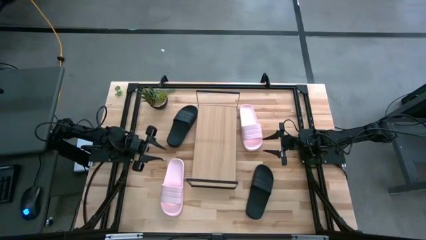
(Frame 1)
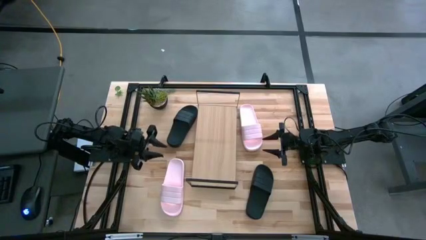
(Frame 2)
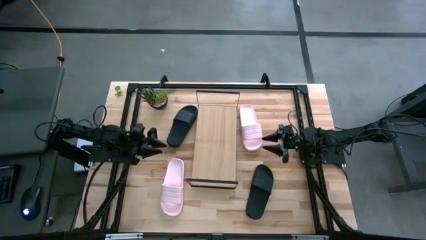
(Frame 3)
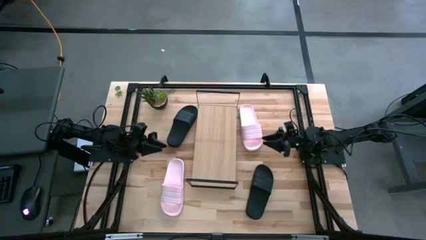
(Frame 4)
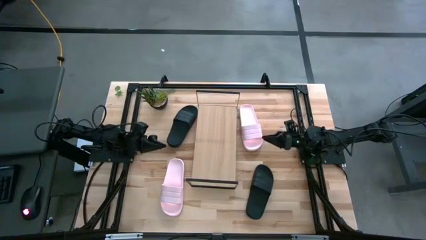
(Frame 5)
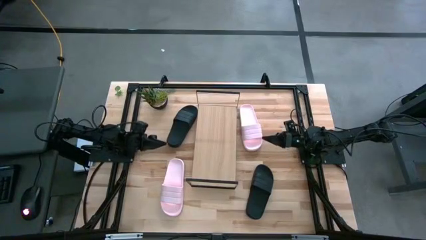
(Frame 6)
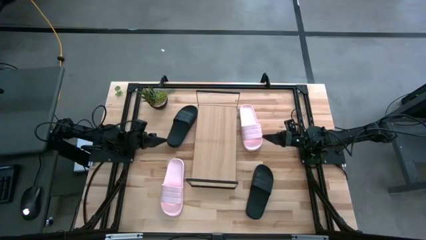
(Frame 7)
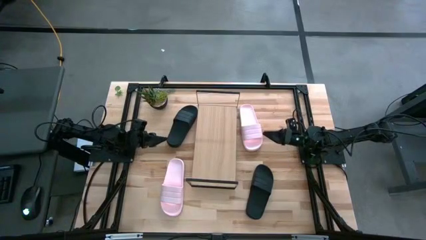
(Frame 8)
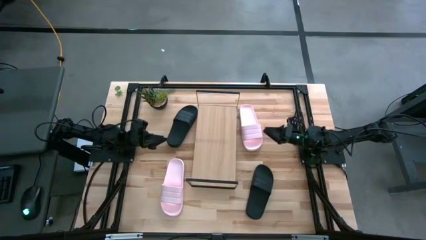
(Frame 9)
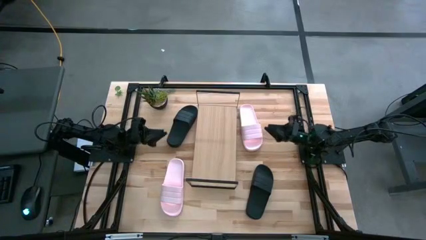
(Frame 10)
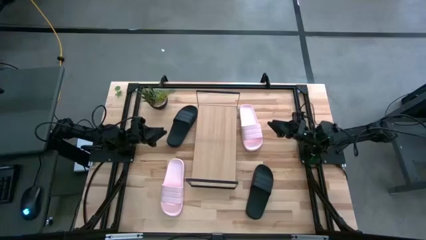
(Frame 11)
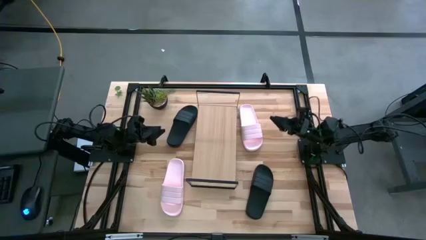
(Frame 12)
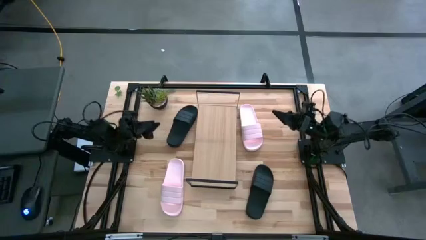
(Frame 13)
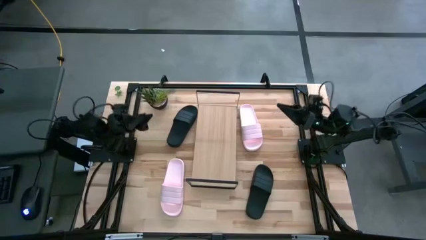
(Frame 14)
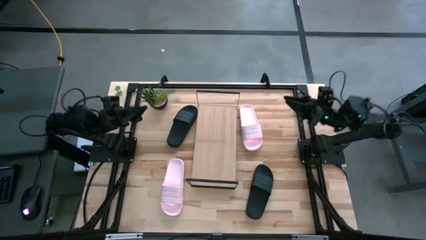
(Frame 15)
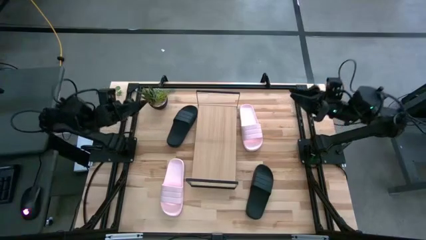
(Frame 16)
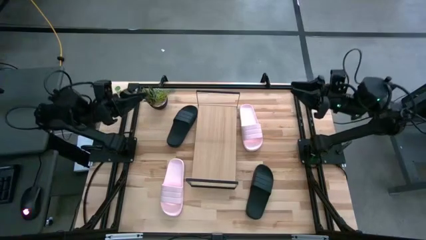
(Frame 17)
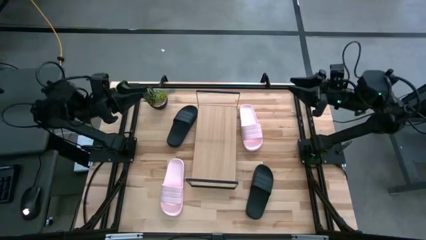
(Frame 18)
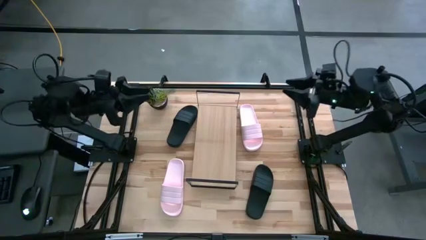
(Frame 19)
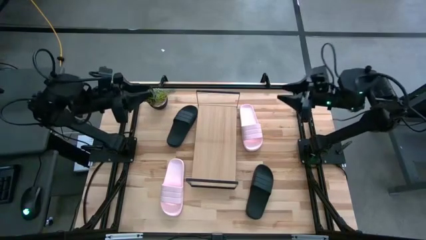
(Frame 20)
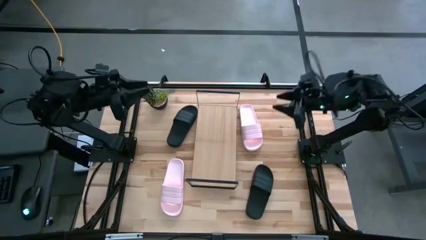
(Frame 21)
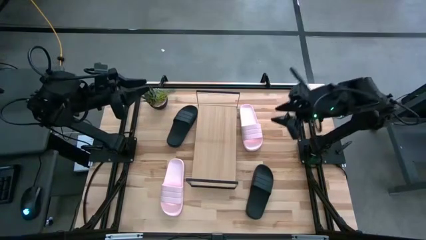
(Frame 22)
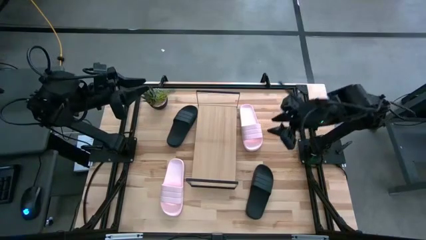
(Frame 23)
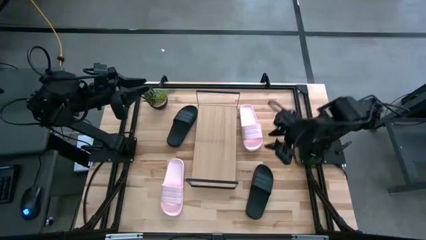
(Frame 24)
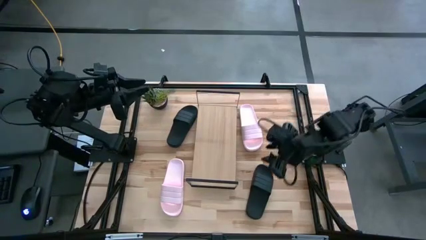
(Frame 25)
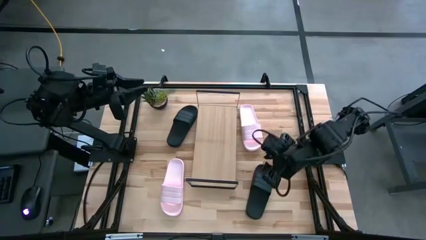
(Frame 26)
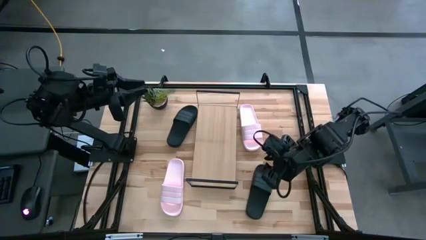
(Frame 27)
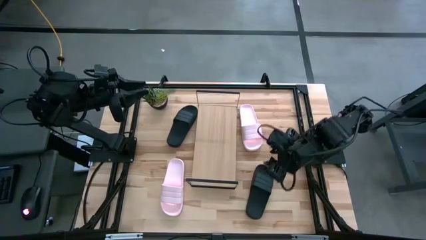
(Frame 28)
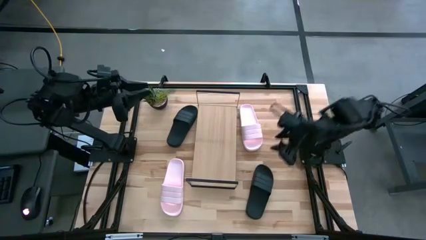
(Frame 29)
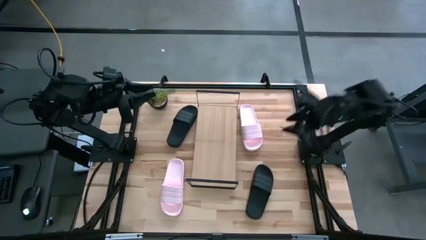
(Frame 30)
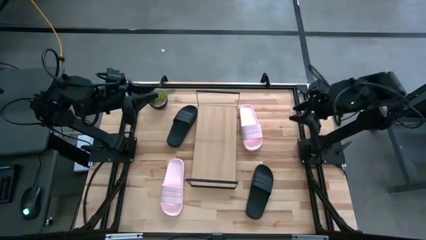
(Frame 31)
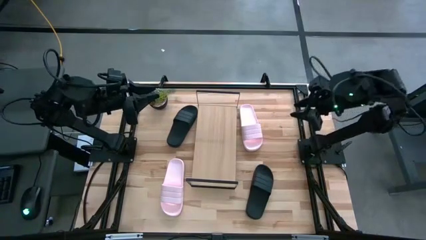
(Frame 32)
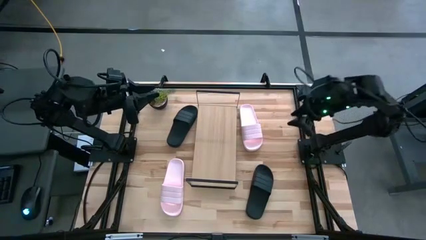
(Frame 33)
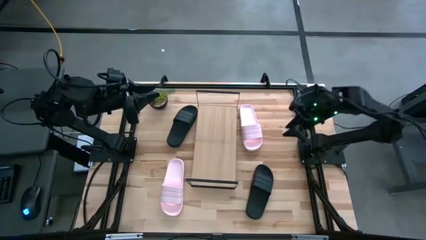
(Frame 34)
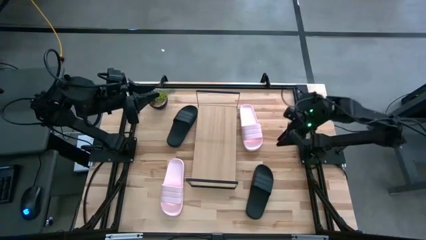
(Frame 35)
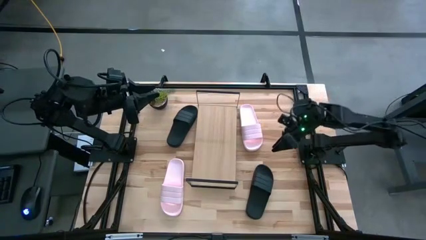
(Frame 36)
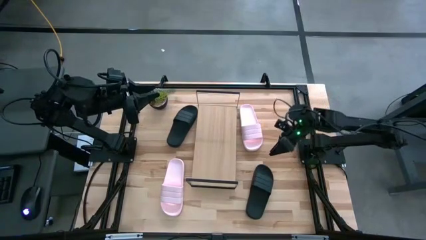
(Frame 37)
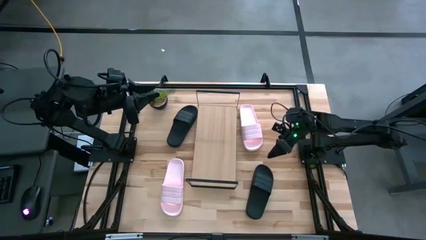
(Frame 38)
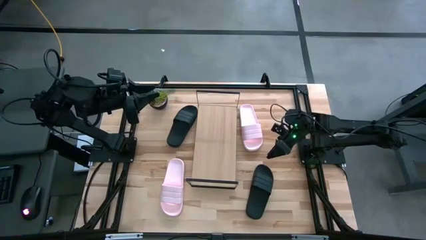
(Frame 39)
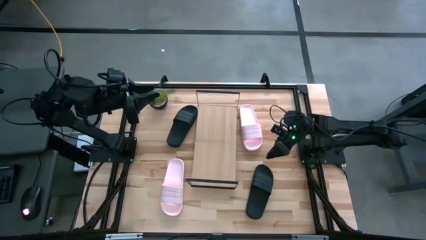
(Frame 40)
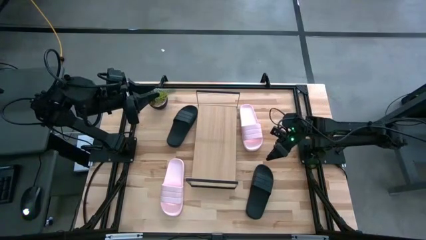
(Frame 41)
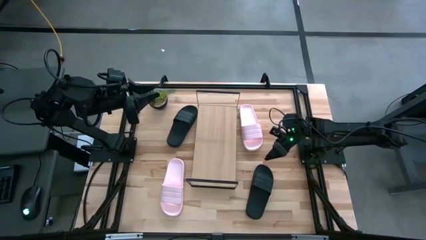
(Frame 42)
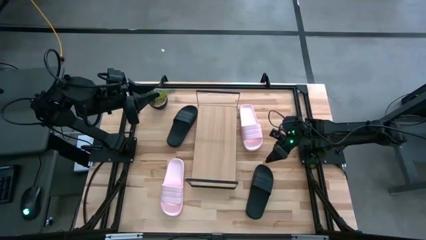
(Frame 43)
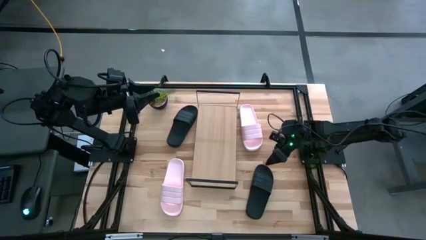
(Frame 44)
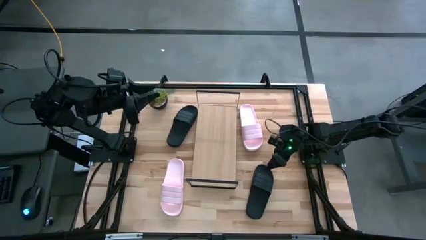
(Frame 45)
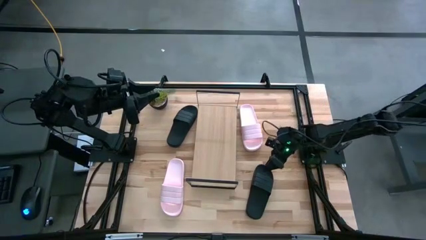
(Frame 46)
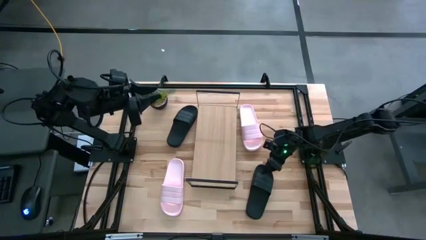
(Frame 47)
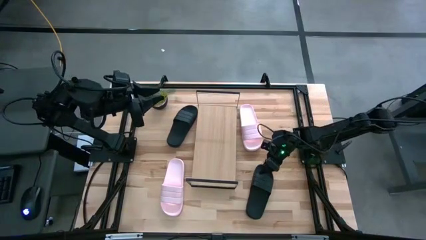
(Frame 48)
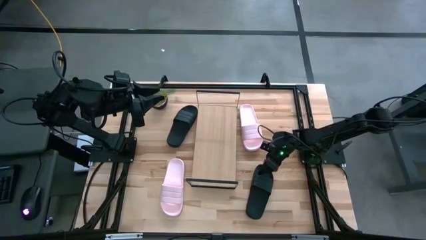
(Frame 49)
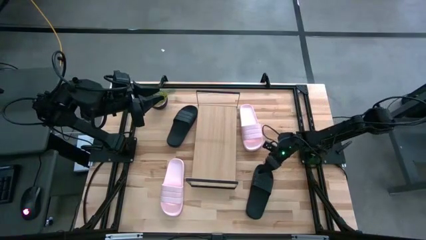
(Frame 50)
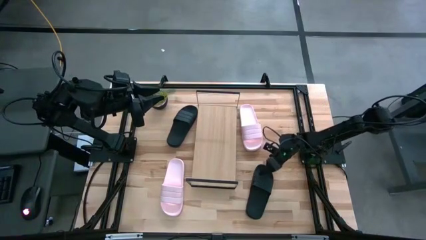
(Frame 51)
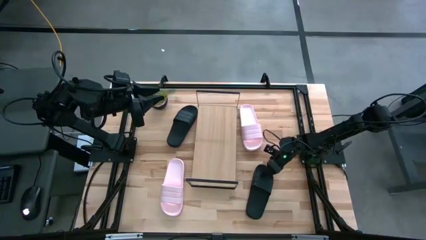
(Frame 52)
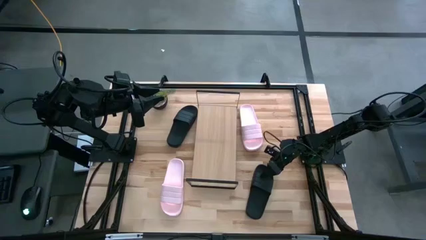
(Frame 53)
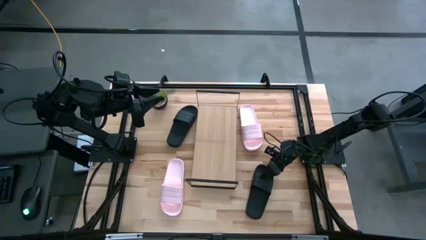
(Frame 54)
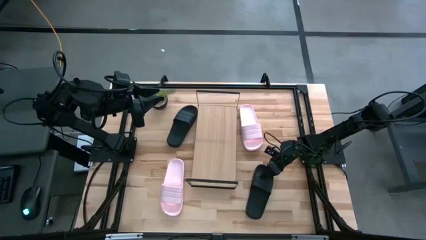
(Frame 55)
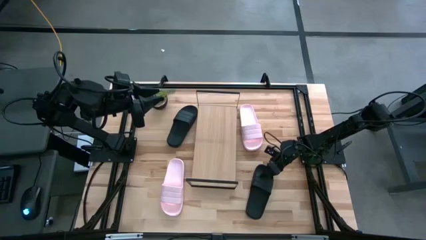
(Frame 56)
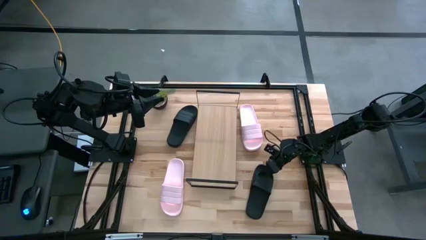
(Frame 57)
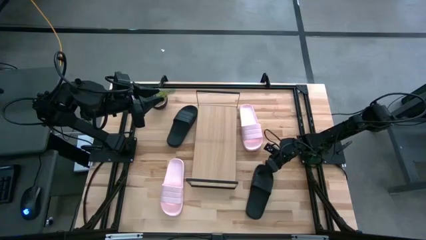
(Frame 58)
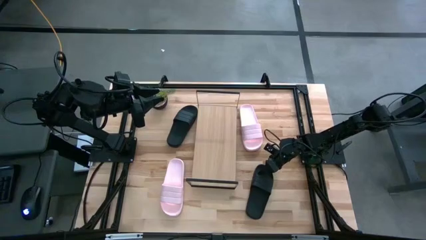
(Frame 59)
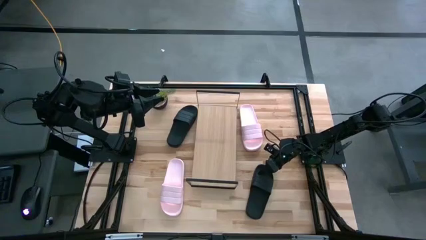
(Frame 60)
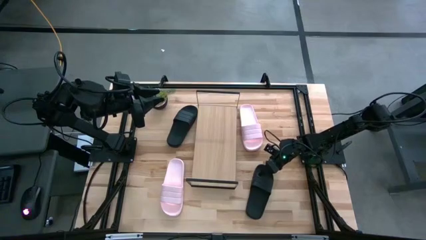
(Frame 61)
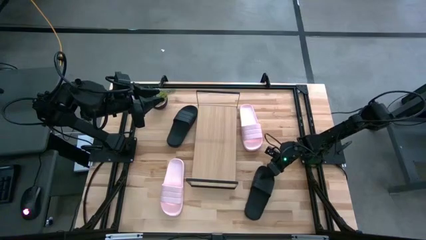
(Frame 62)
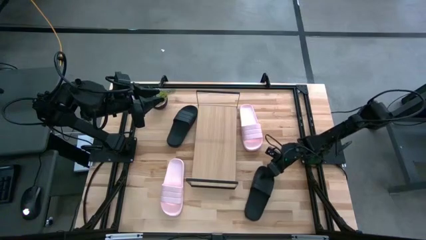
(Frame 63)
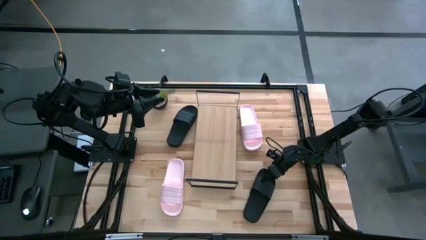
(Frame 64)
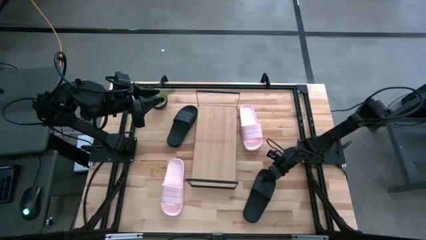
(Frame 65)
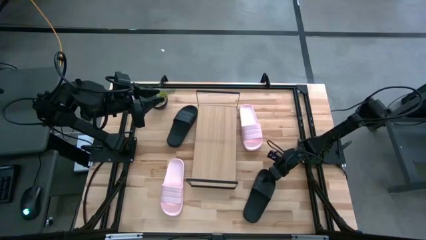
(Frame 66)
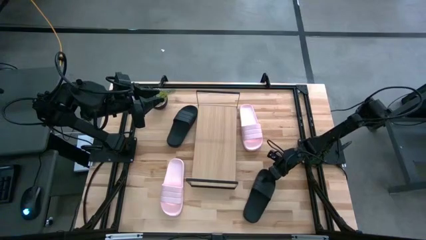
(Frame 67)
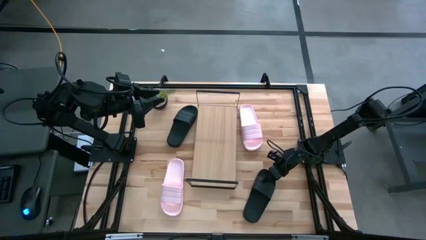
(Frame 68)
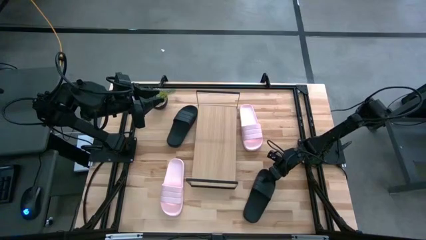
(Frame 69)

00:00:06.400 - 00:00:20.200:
Task: Pick and place slides into the shelf
Put the bottom black slide on the shelf
